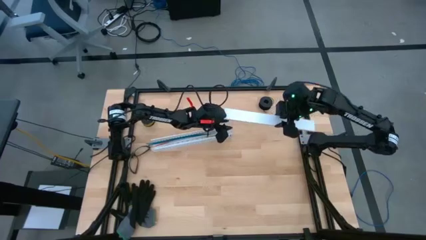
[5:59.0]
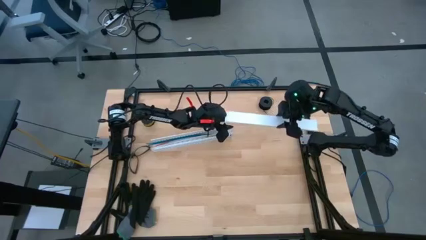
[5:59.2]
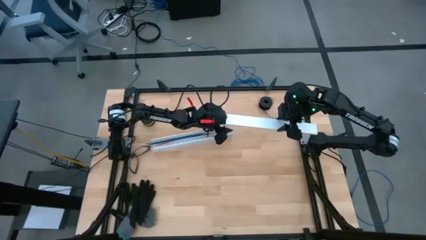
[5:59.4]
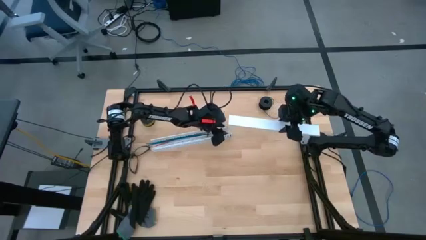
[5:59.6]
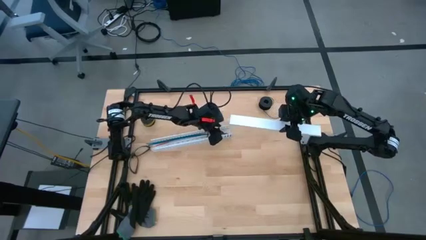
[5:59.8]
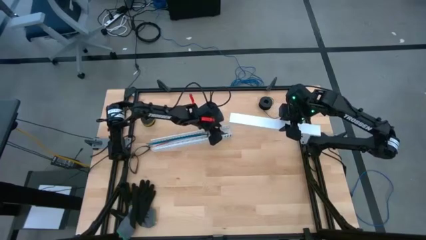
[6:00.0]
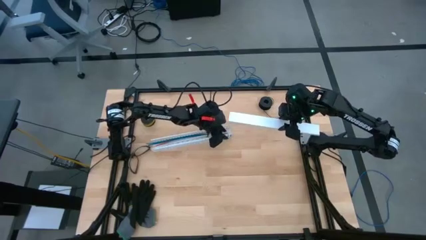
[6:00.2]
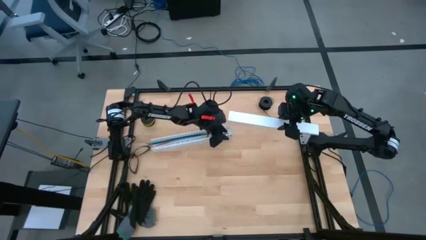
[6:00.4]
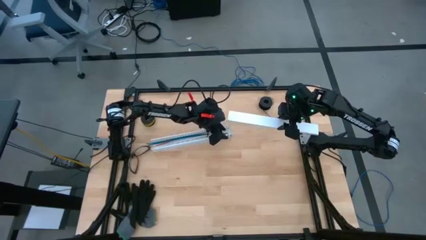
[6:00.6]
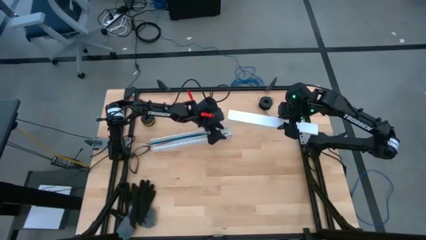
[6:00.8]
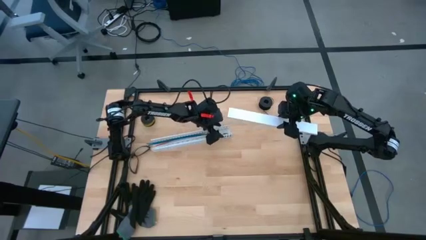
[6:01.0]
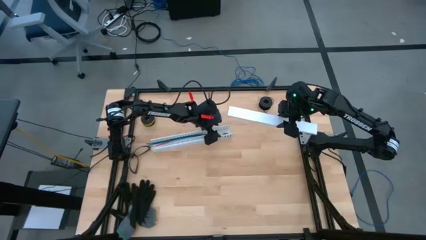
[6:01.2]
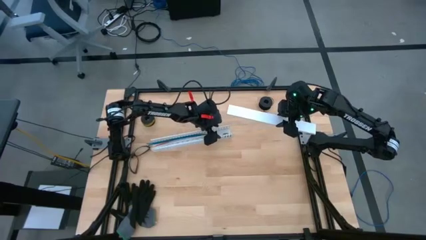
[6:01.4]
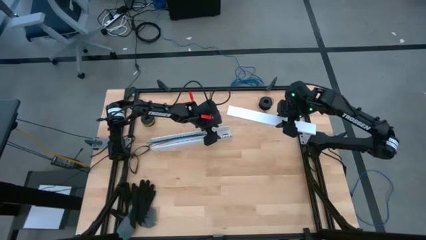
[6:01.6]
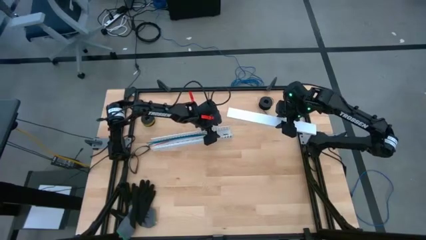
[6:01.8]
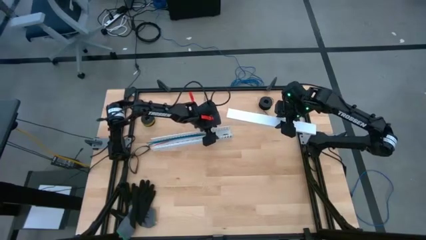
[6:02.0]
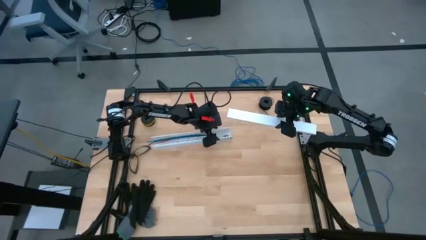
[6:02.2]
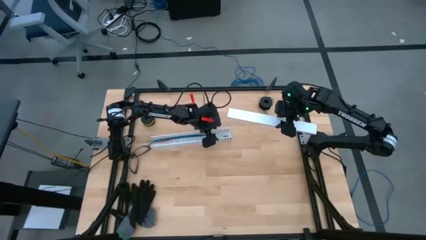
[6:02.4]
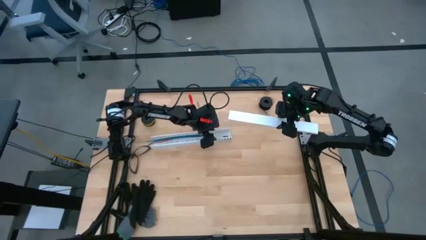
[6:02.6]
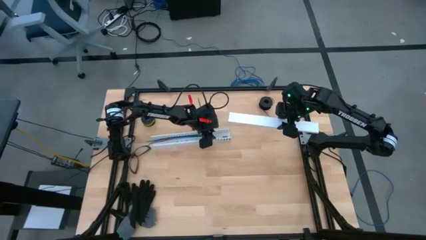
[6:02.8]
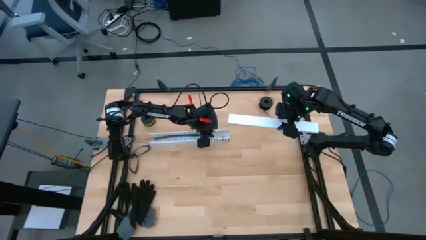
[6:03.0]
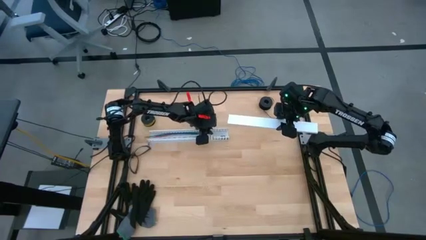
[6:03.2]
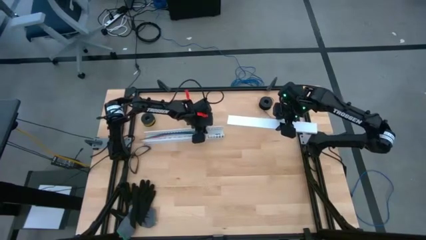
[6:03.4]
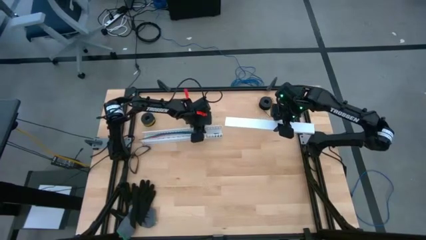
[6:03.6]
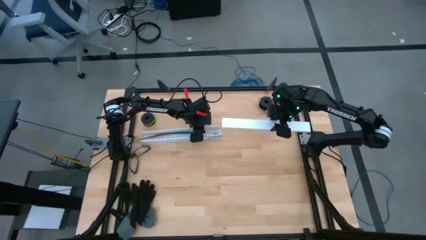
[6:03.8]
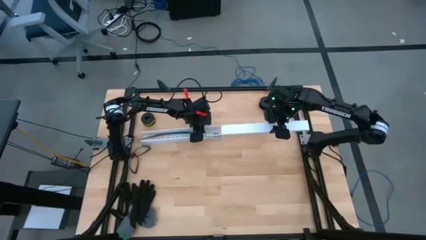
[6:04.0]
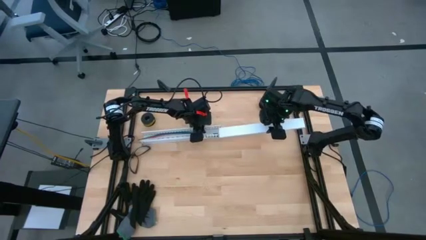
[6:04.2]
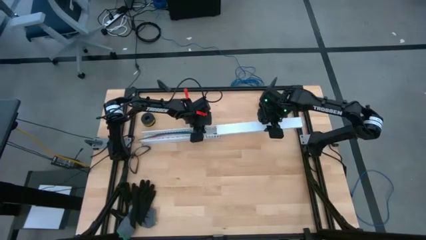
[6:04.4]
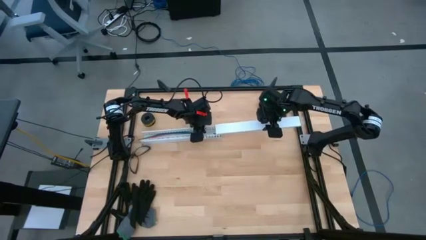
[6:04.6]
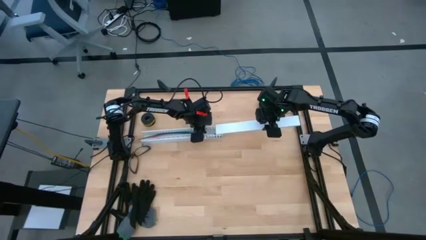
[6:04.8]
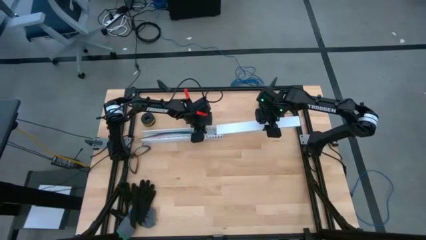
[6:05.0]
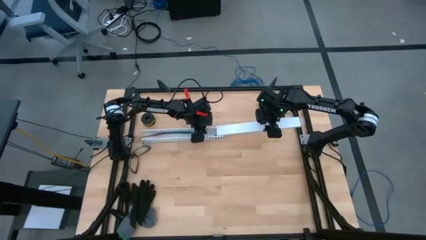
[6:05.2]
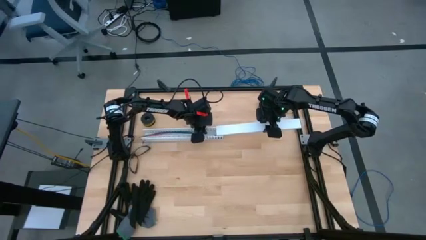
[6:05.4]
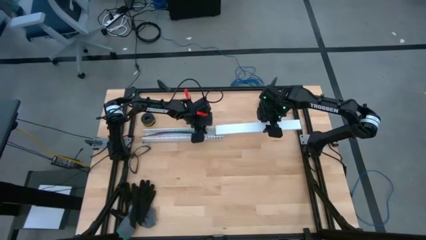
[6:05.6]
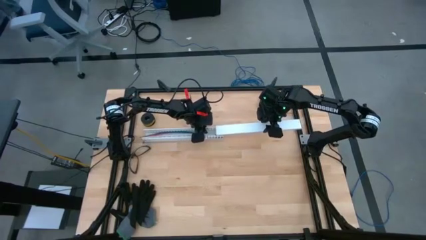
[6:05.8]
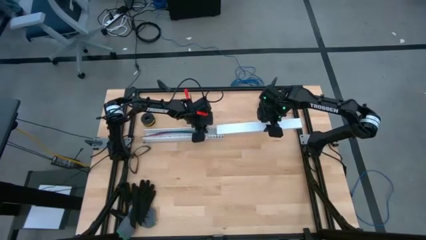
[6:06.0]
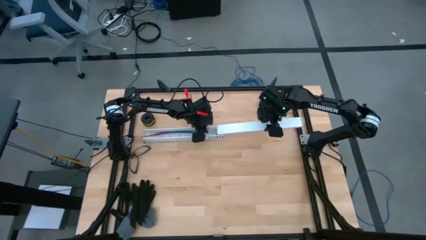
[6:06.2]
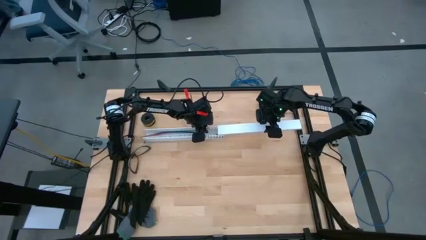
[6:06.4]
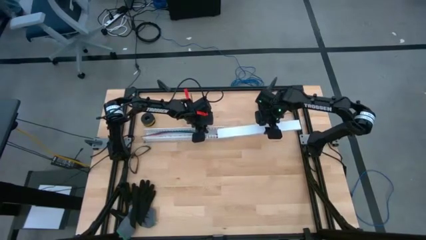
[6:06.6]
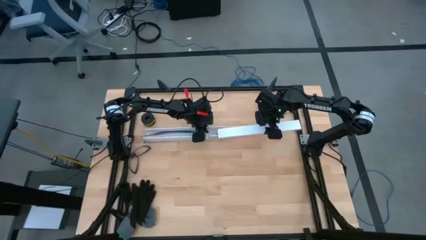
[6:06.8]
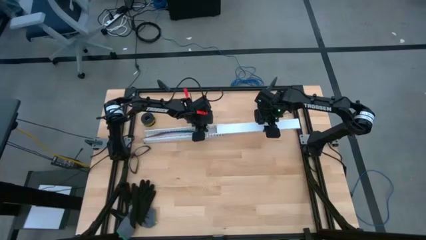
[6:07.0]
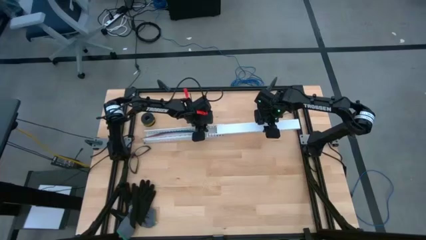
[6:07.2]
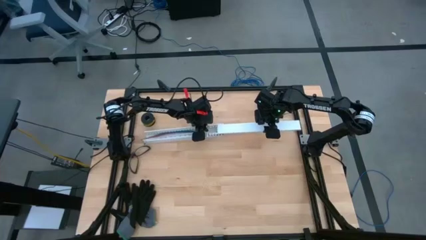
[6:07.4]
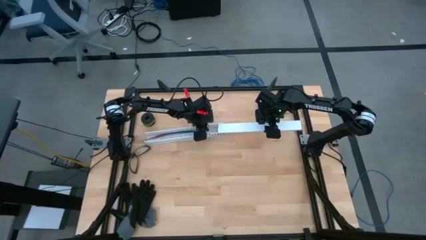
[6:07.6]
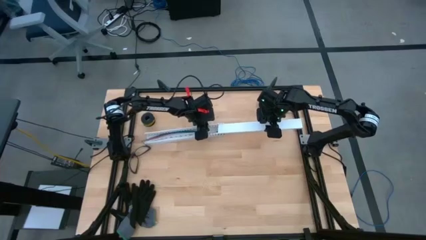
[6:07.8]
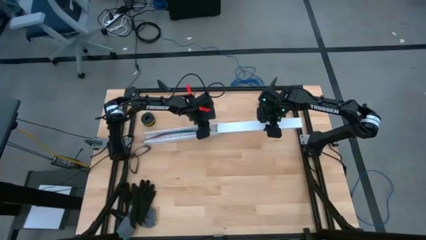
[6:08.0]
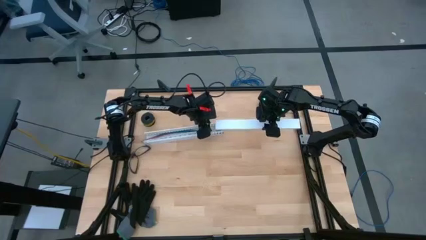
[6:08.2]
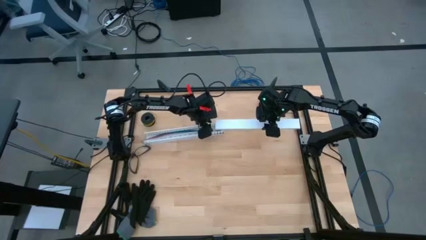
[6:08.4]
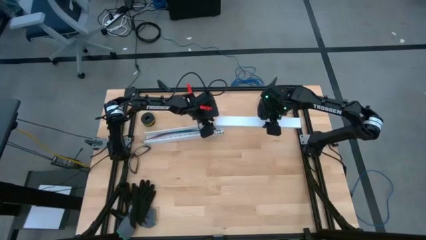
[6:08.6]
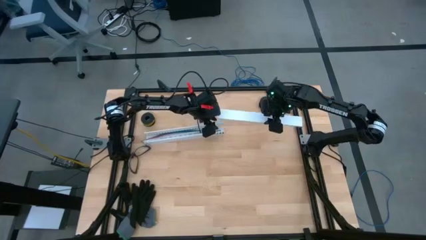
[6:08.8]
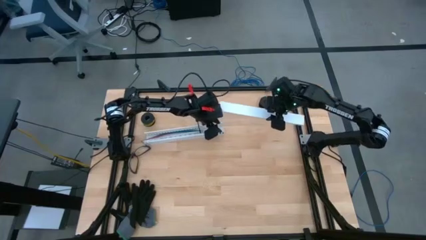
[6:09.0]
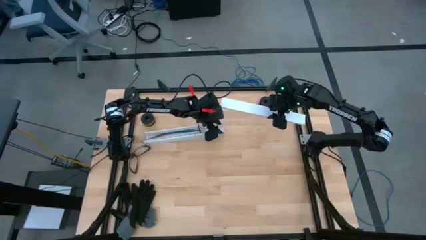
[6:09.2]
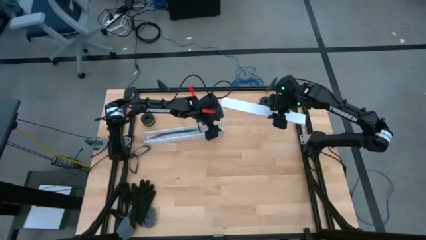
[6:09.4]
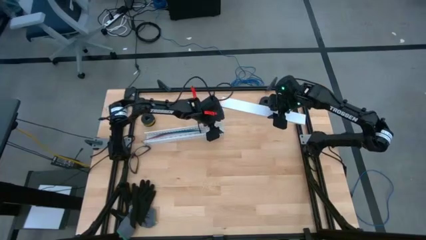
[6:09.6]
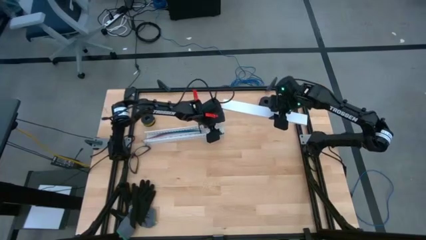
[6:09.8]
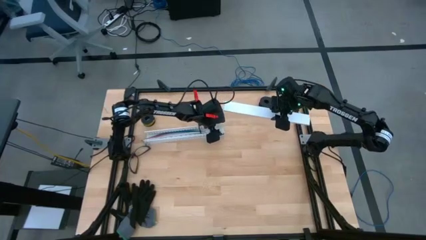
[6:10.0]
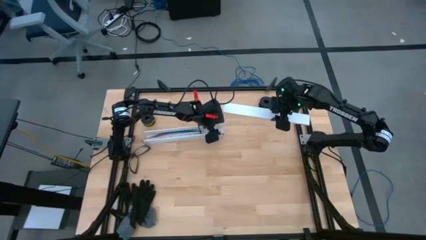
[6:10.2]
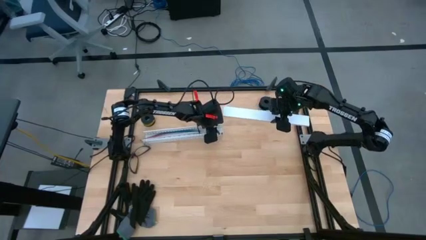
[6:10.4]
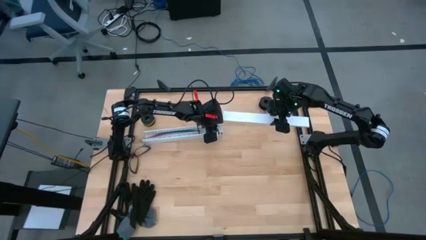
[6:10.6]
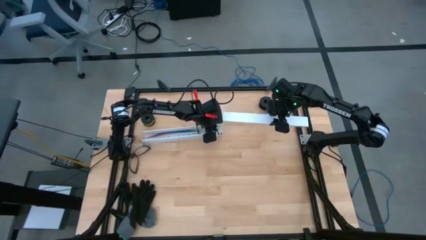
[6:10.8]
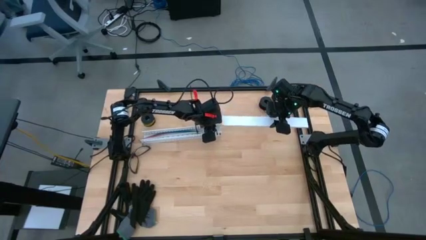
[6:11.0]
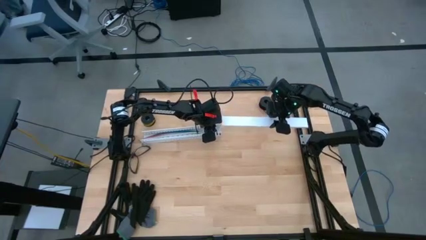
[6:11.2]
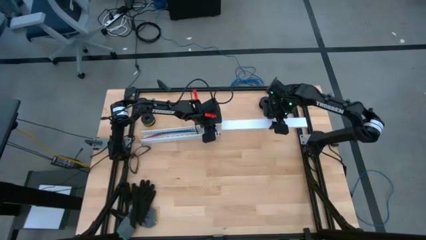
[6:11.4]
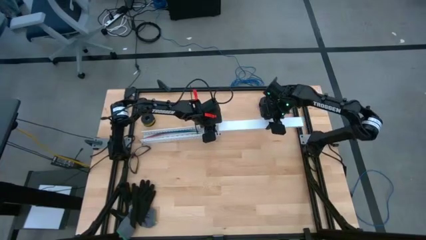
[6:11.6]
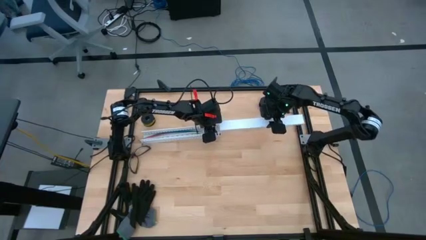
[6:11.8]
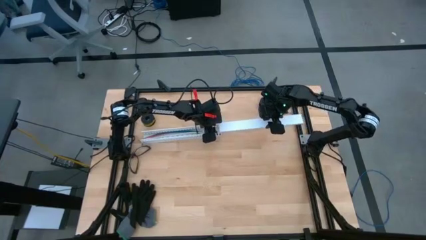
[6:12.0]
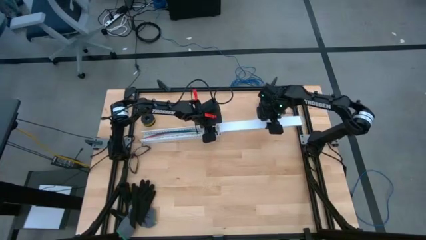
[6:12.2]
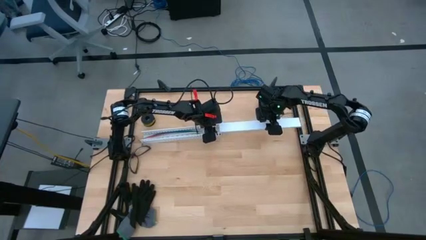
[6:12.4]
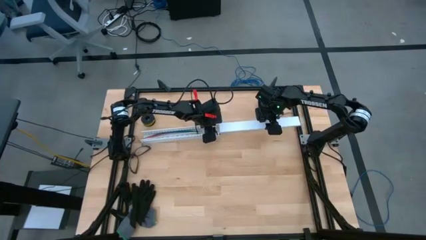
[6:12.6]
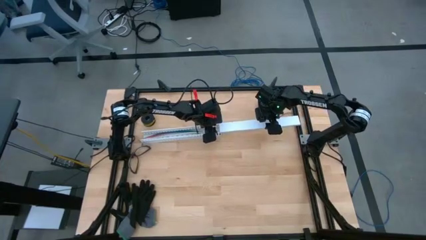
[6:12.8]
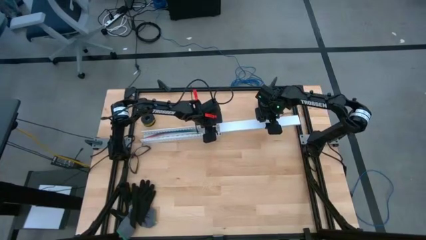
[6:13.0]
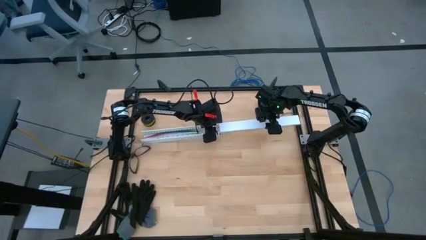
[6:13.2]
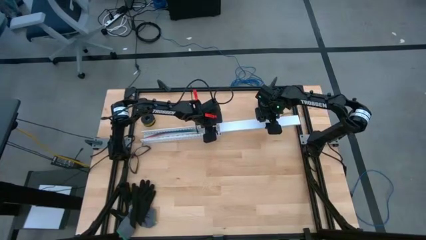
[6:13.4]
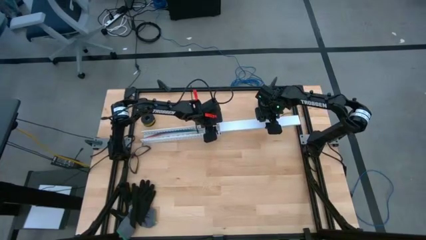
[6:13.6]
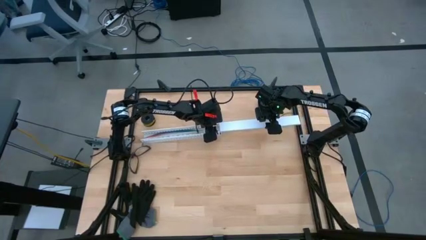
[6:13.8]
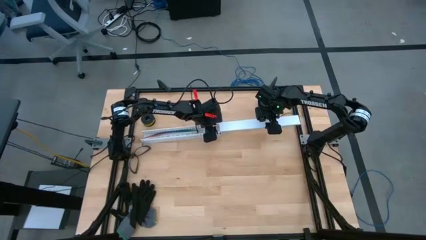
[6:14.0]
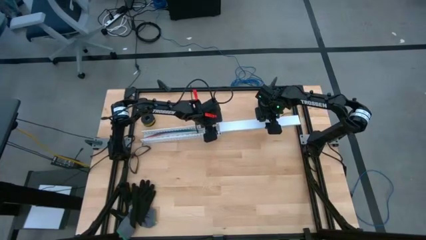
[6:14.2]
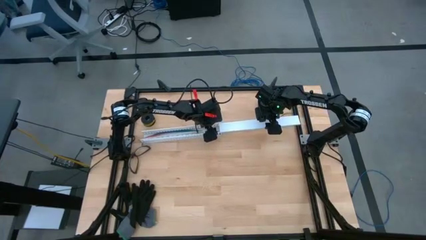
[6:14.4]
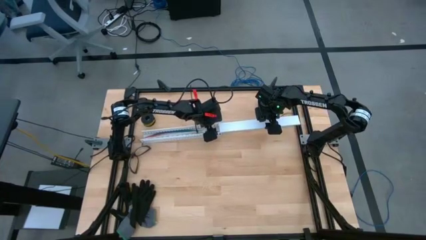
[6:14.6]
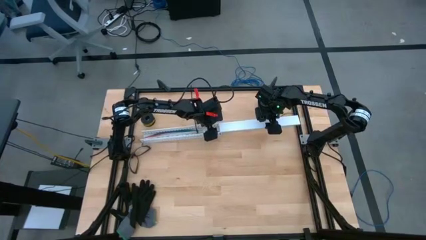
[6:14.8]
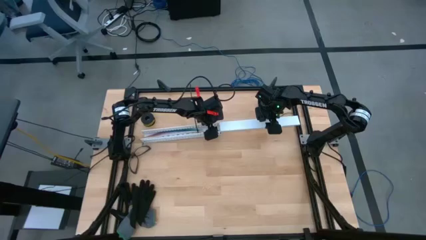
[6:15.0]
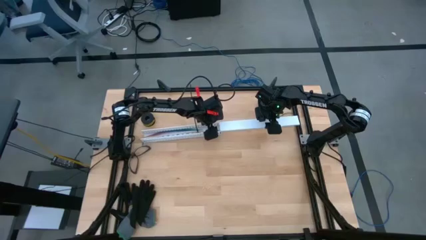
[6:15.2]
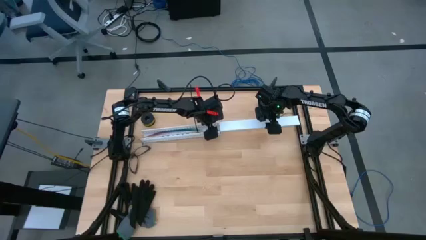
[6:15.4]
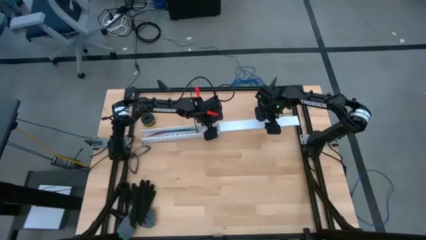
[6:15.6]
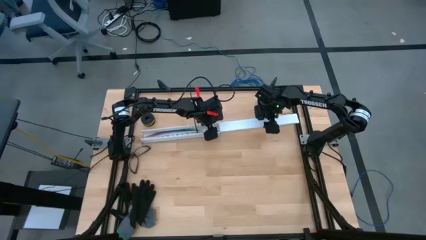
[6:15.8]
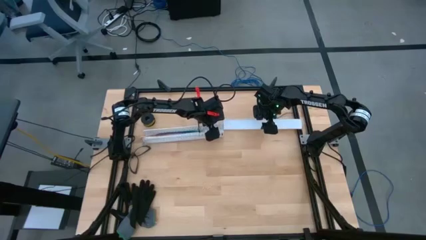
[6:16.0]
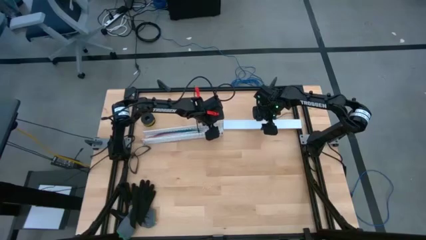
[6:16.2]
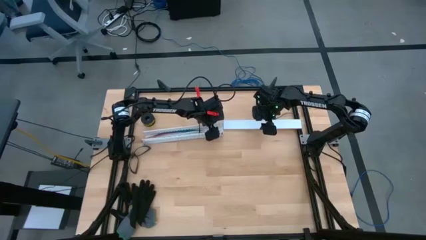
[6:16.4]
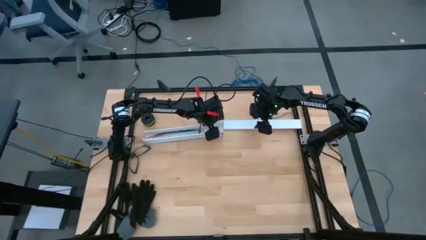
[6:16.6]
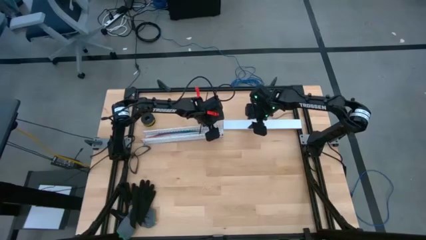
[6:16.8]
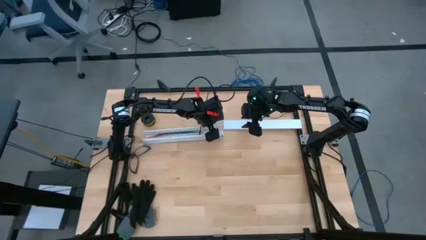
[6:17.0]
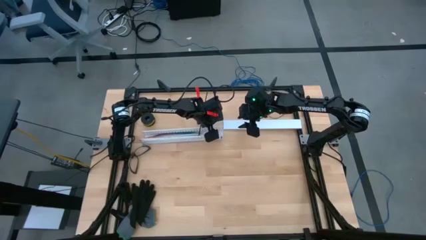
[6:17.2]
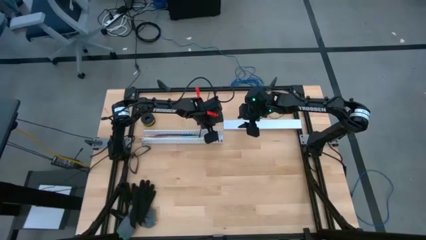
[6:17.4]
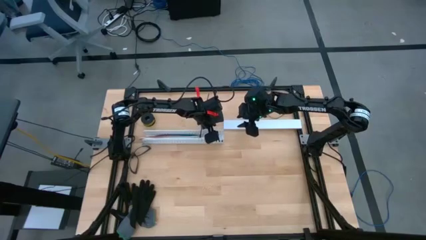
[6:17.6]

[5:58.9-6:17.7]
Task: Ziptie cables
Close the white cable duct
